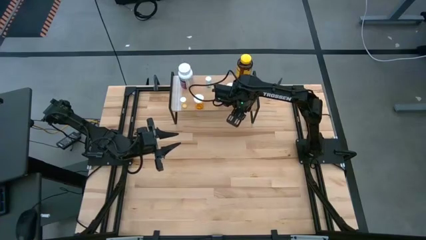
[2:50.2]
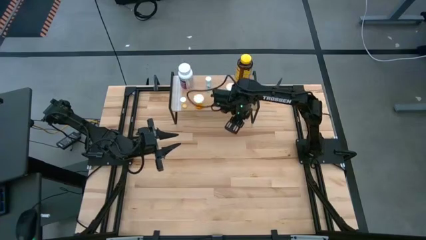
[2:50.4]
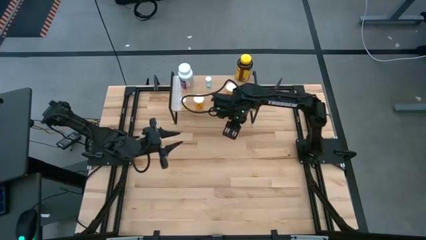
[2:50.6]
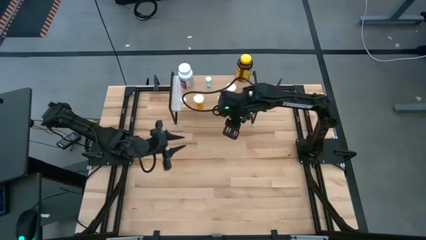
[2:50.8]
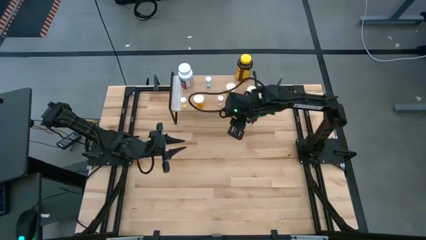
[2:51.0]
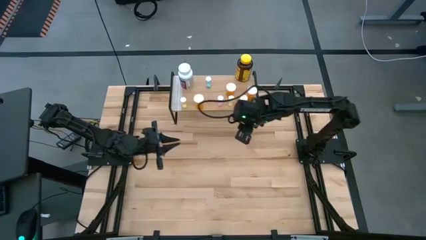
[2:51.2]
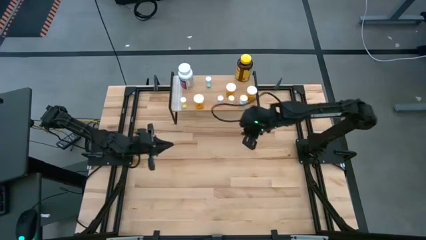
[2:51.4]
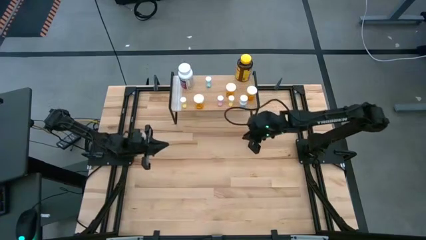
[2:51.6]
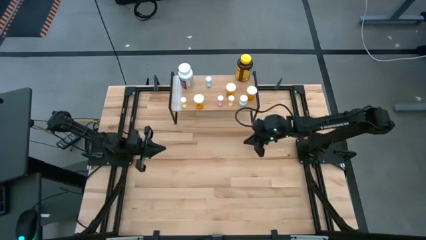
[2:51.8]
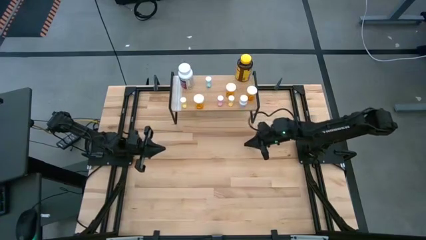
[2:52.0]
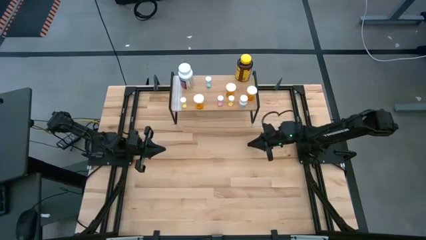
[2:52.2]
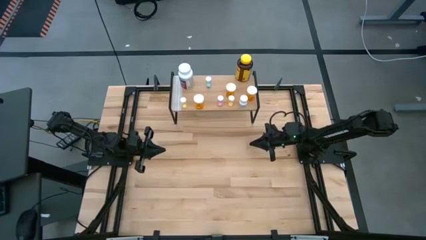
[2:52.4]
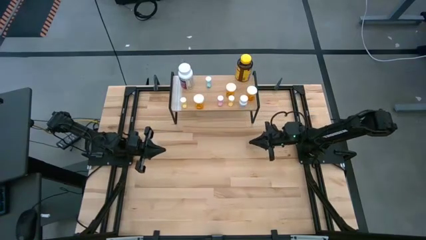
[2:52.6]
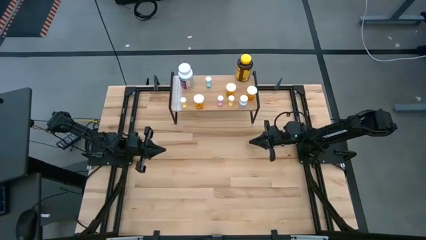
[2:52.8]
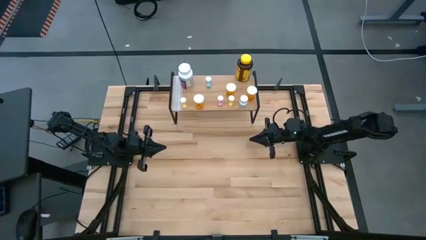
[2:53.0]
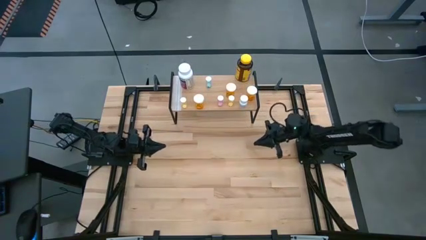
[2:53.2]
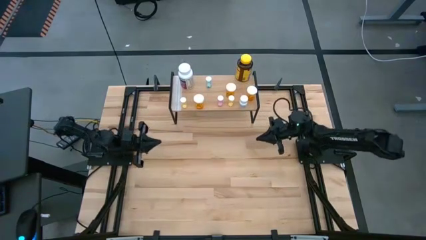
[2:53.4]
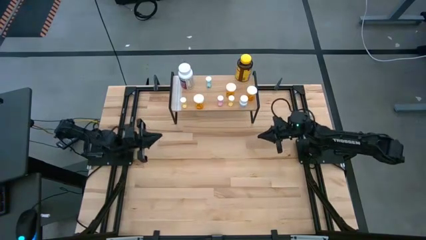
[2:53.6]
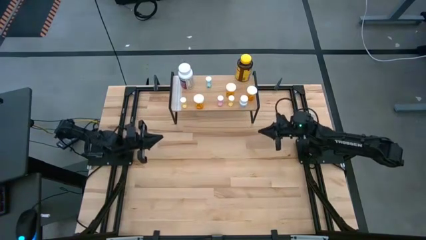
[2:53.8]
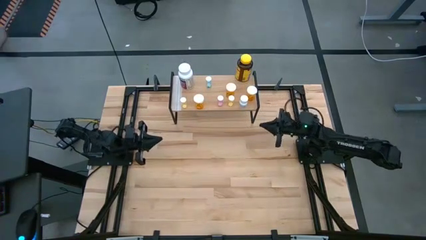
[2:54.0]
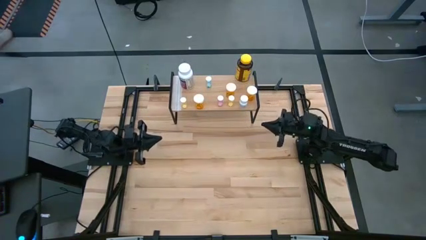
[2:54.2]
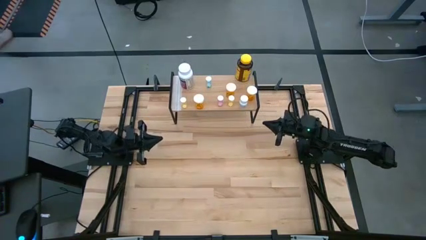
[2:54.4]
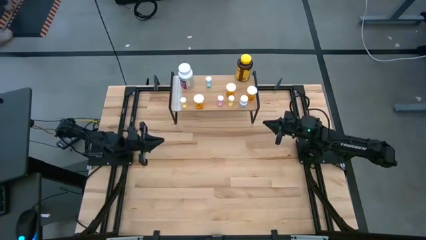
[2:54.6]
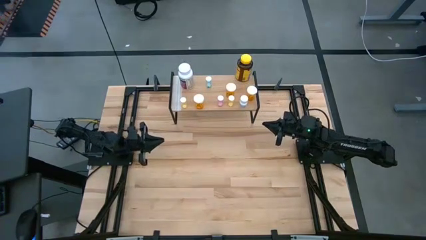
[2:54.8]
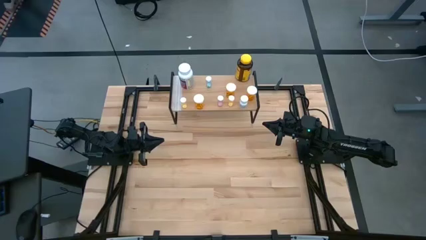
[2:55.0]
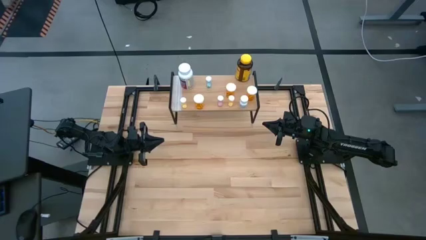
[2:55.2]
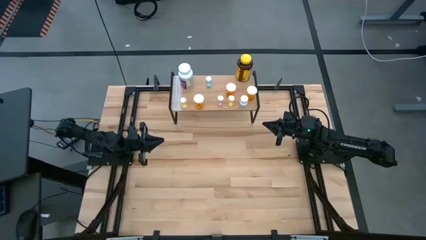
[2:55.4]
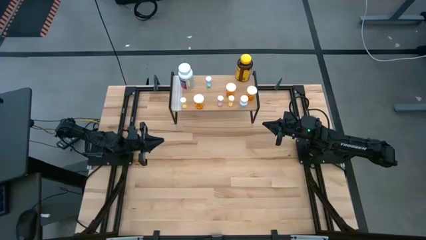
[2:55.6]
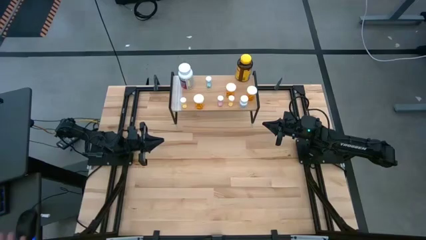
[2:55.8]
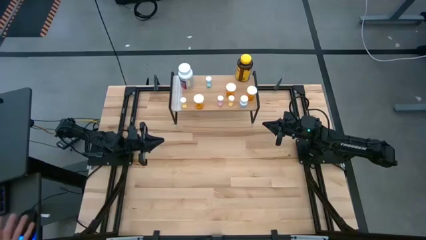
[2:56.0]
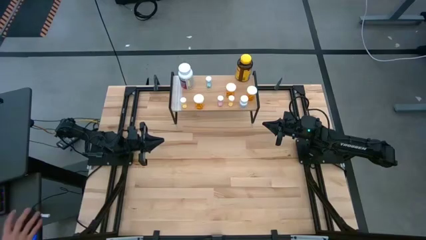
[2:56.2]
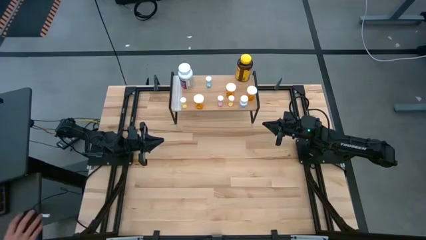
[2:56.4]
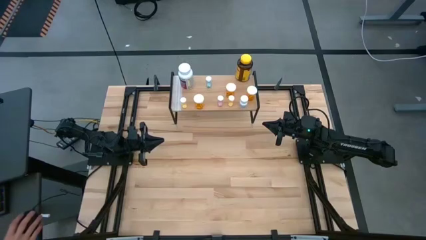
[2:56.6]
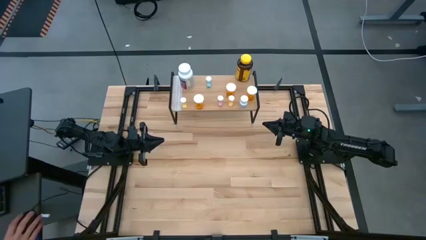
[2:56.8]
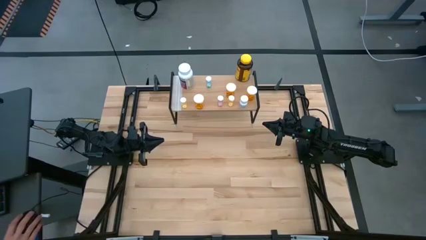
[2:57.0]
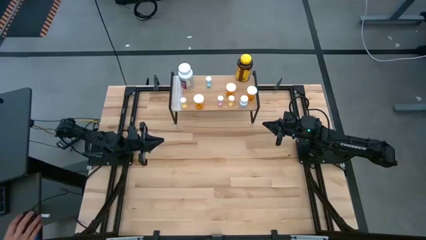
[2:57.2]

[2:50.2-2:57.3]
Task: Pick and place medicine bottles onto shelf by color
Return to Home Position

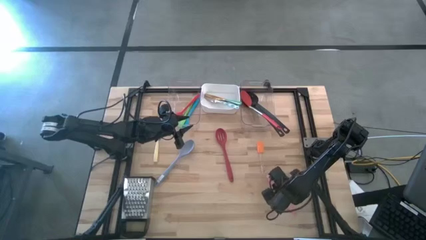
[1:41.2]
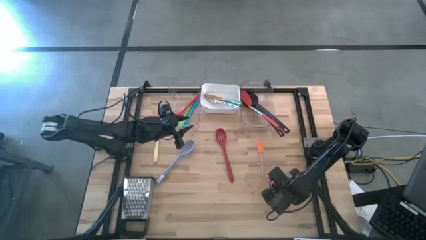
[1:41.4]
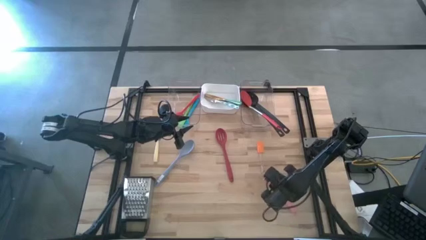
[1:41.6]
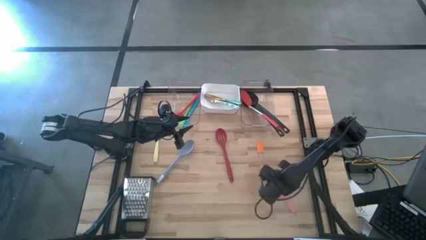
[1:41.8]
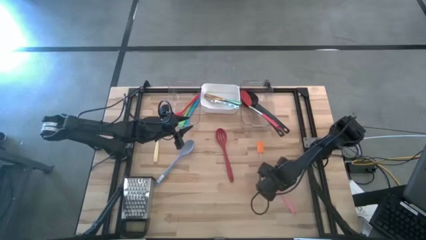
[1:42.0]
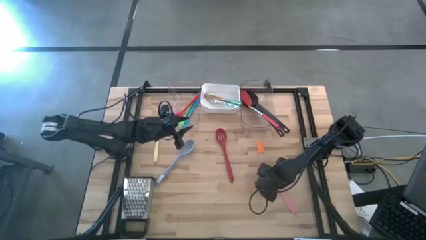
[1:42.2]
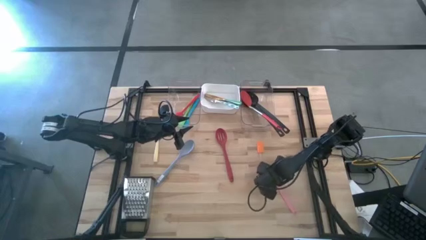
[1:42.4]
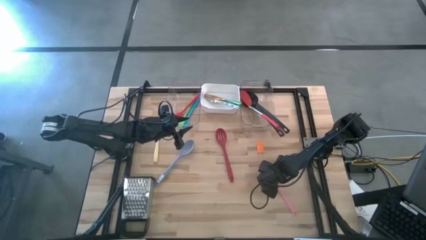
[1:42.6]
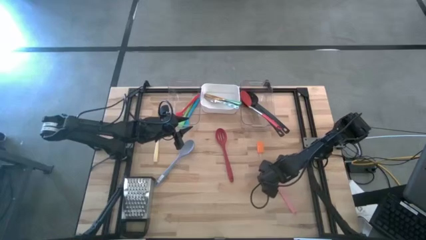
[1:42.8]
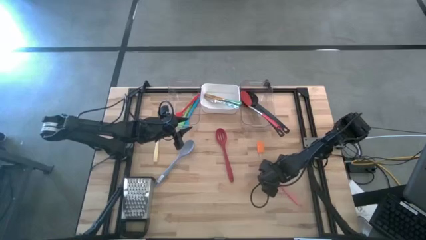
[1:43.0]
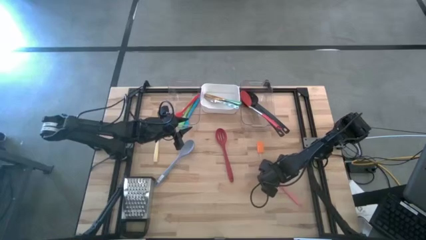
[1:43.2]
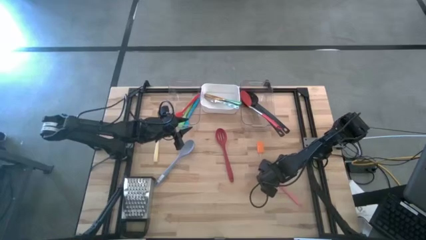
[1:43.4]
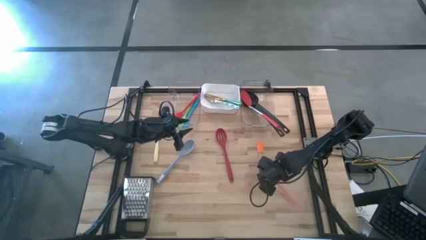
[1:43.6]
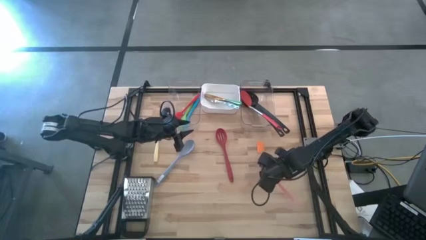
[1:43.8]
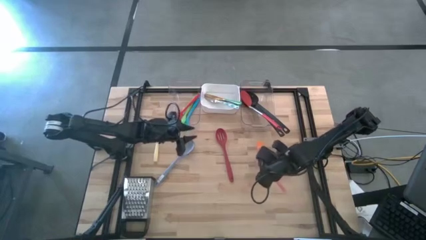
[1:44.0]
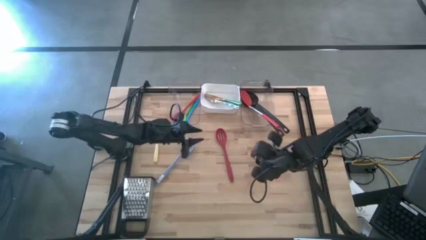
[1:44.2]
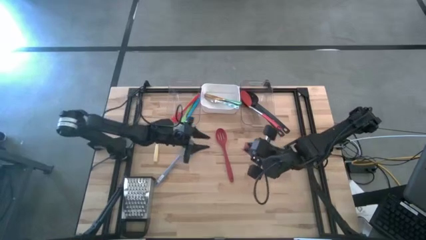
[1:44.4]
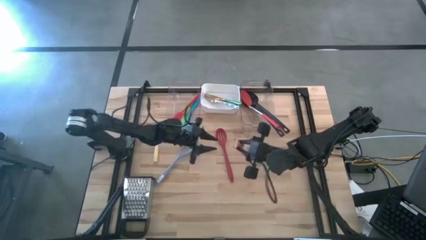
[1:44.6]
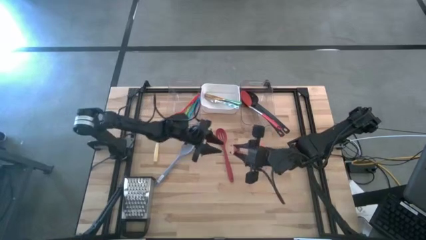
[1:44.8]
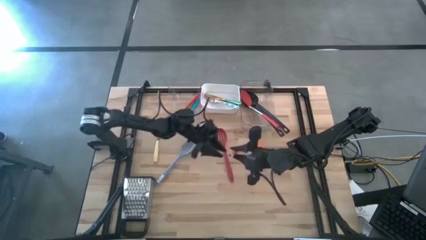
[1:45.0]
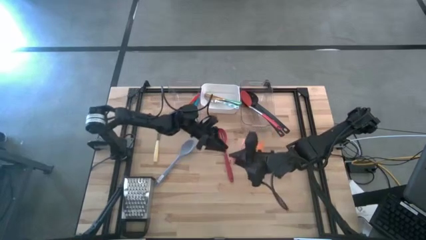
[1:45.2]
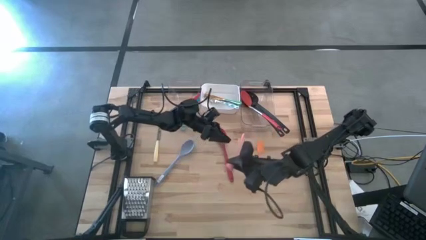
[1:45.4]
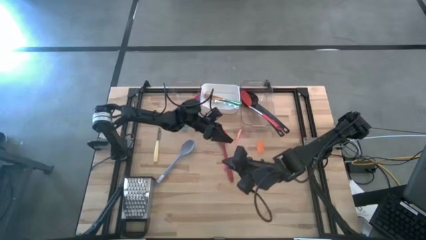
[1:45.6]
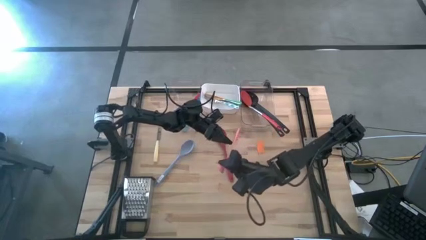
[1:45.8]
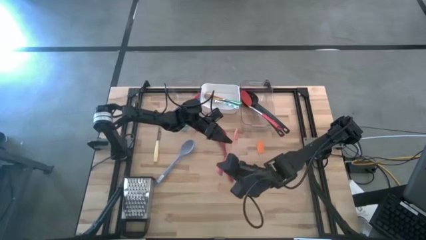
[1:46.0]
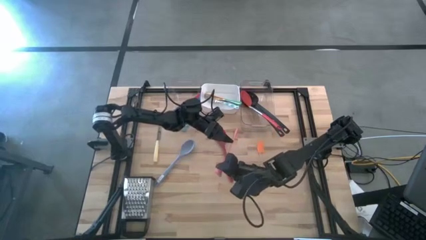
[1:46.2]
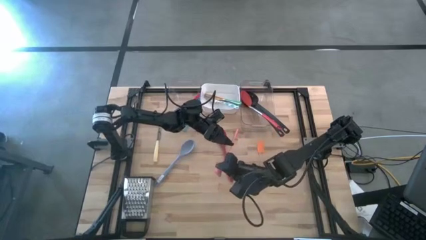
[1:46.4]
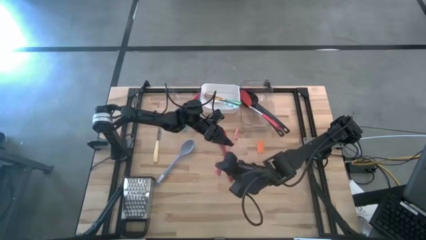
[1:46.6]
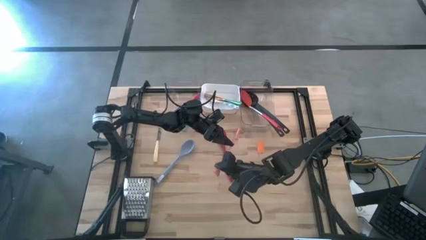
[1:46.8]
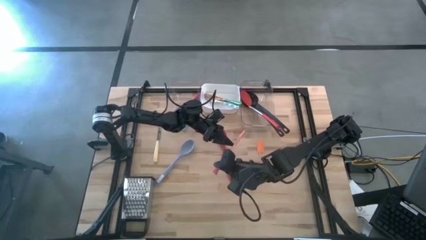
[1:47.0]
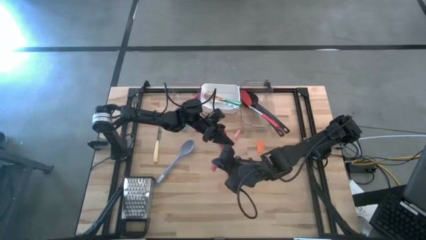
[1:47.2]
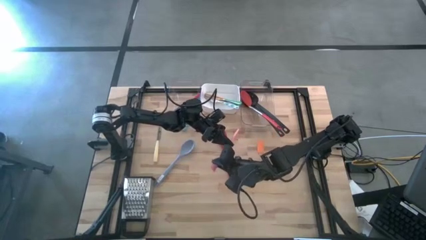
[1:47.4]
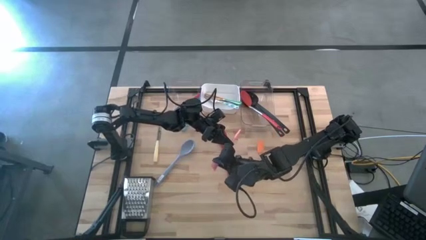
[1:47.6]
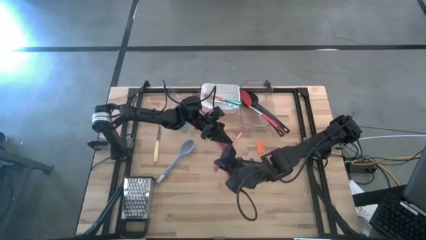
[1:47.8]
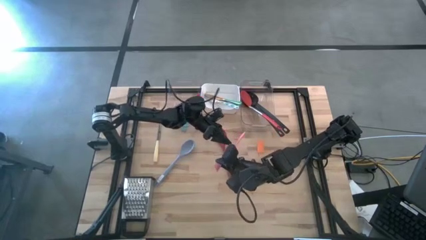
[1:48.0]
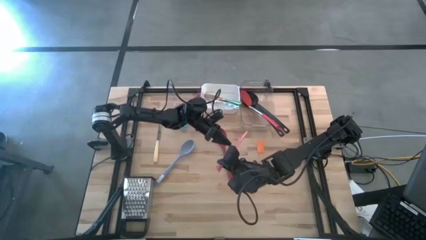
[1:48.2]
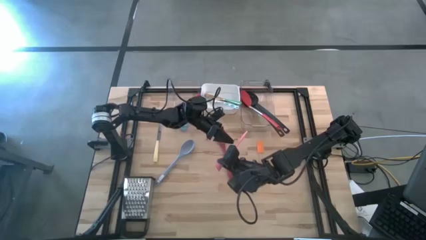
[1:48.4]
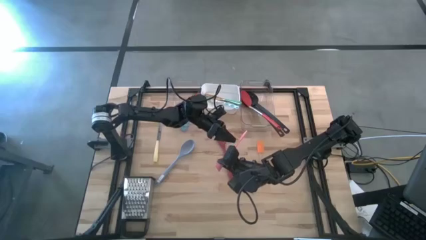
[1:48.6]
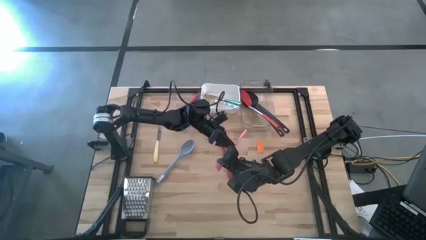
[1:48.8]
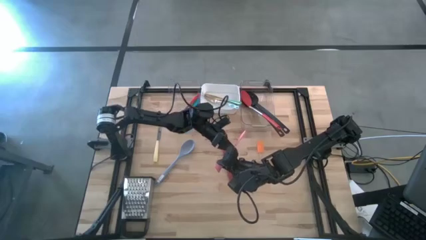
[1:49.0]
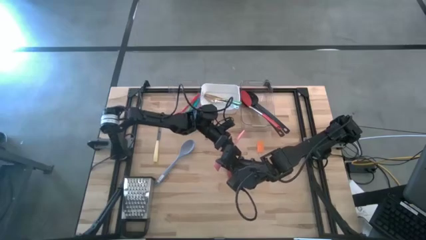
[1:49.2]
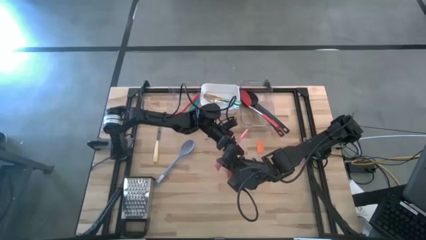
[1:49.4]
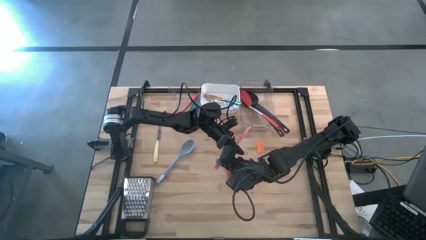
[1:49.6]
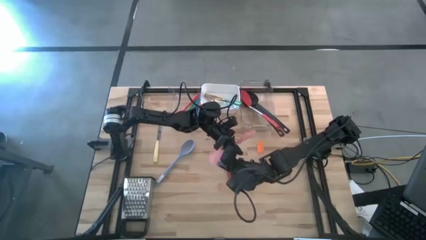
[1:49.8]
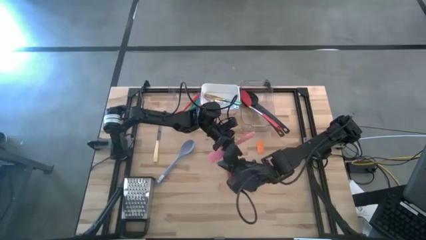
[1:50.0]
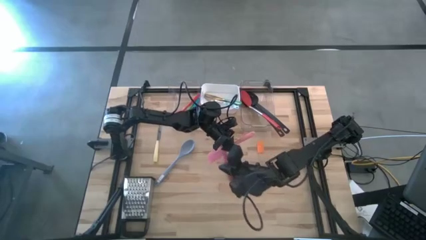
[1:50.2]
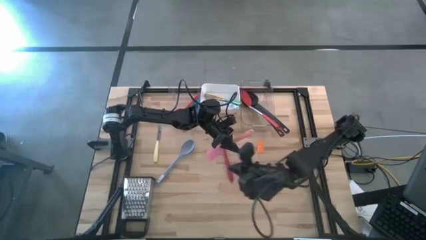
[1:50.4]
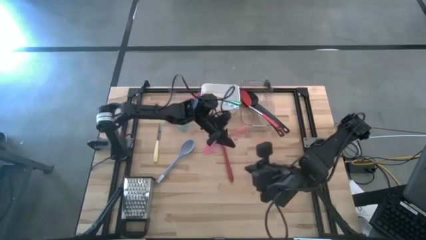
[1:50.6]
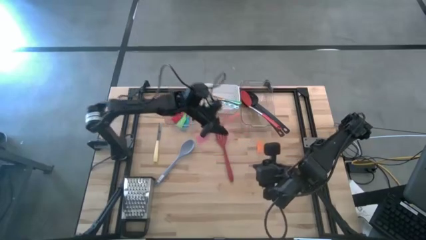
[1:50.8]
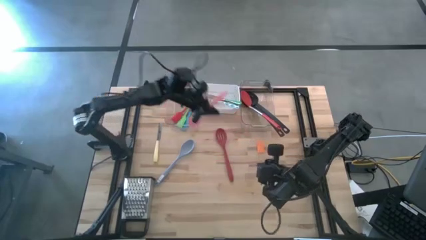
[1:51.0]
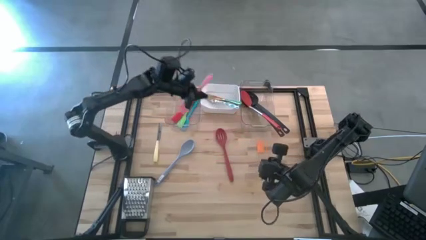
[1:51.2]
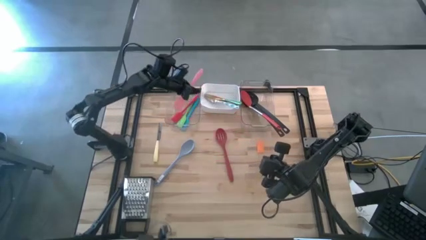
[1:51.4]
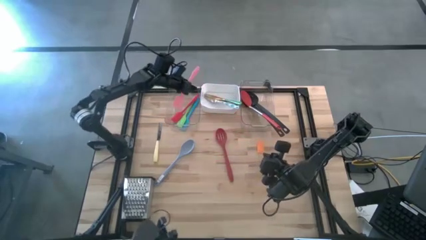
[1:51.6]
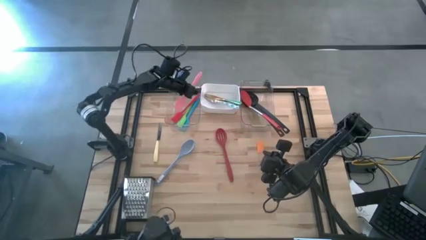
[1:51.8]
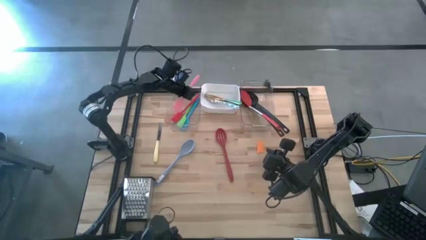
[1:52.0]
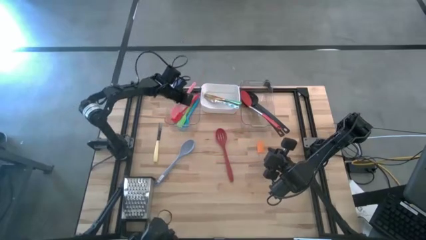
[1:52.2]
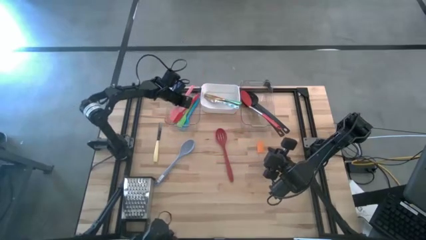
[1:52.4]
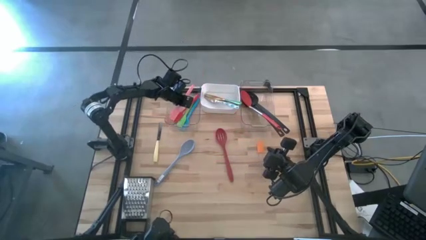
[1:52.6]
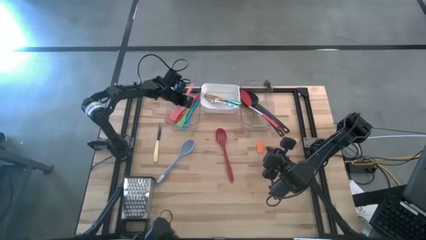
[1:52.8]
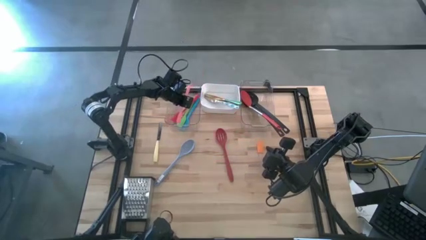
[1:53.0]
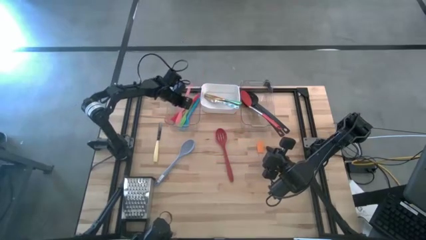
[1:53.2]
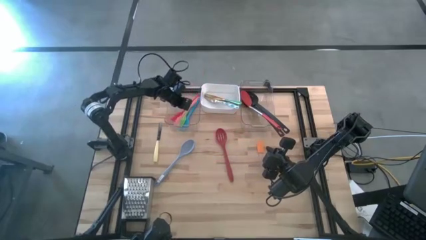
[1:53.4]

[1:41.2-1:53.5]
Task: Pick & Place Kitchen Items
Put the pink spatula into the left transparent bin
